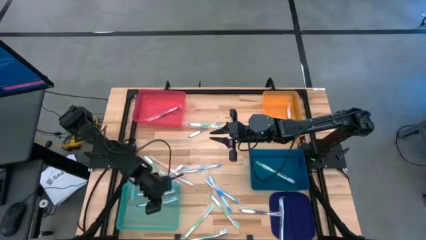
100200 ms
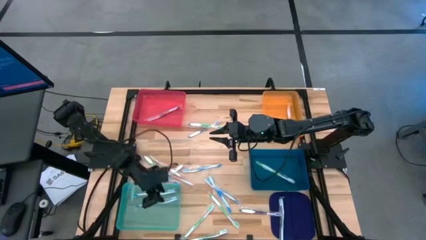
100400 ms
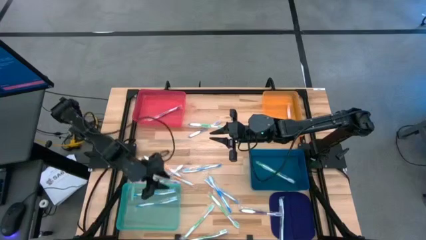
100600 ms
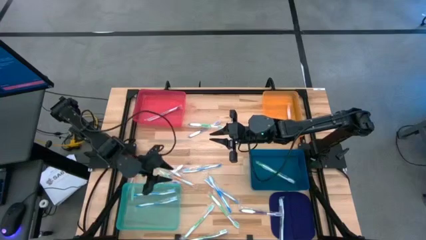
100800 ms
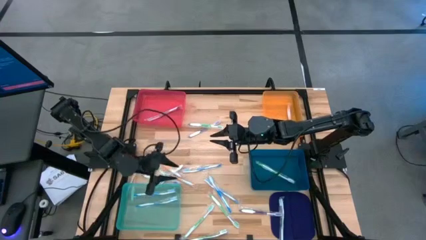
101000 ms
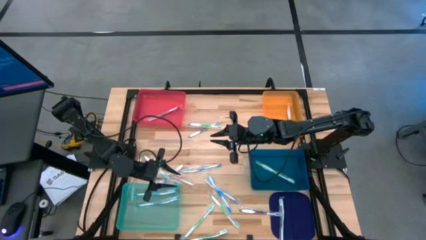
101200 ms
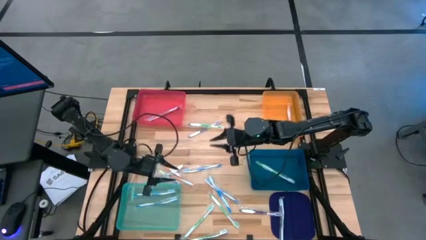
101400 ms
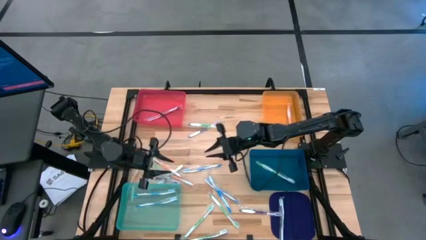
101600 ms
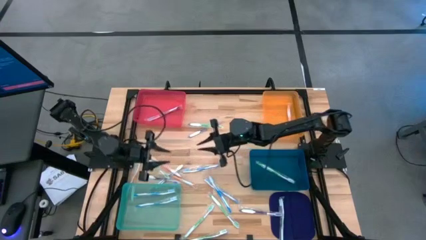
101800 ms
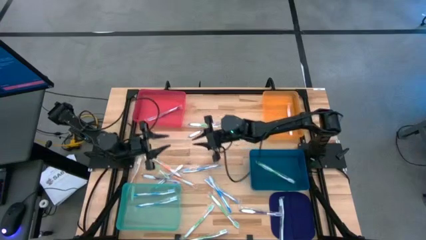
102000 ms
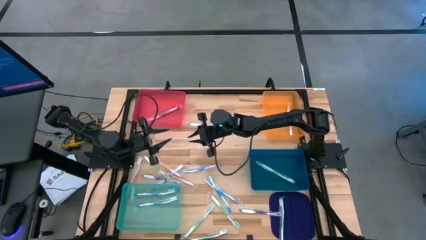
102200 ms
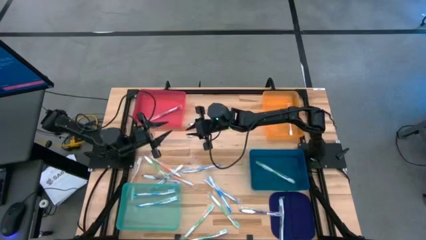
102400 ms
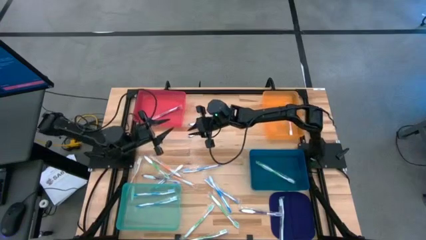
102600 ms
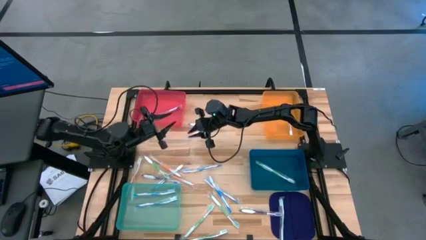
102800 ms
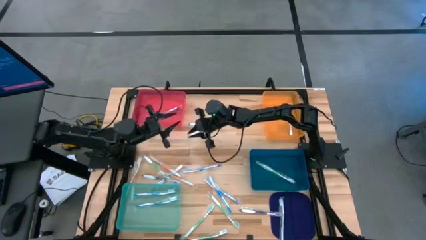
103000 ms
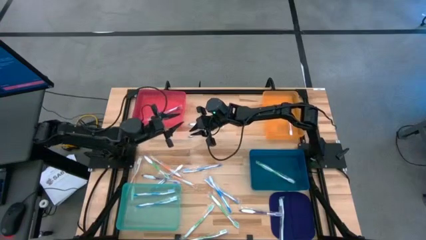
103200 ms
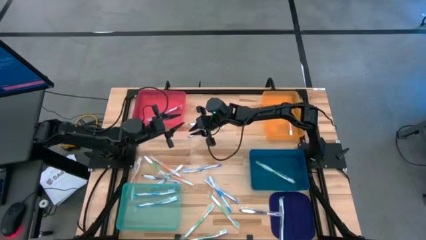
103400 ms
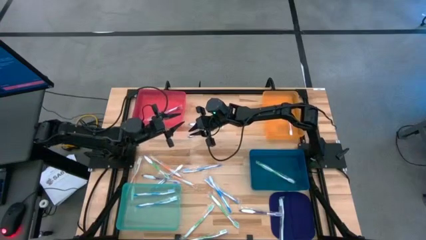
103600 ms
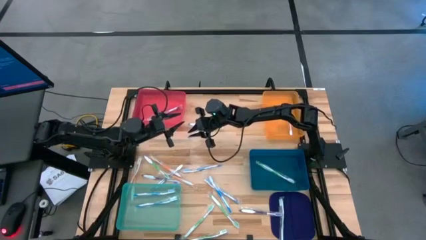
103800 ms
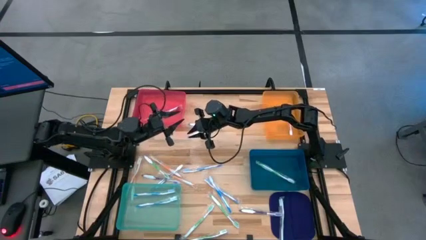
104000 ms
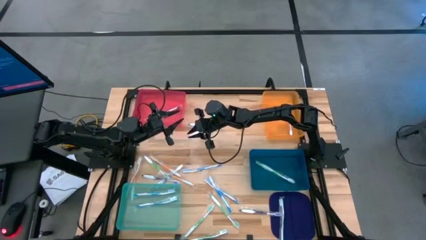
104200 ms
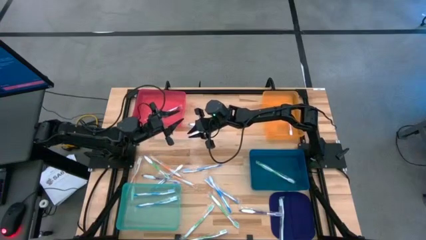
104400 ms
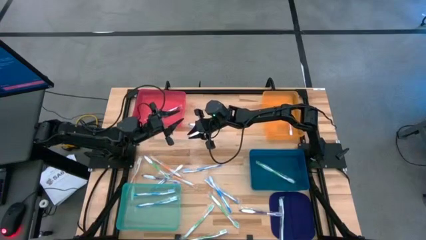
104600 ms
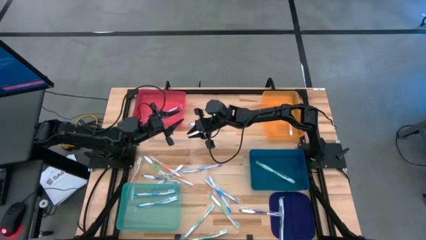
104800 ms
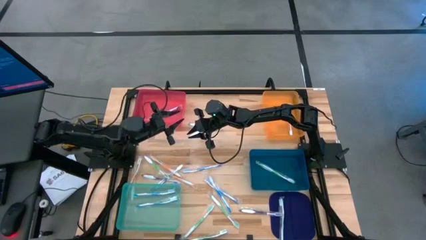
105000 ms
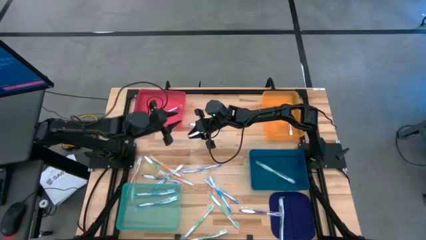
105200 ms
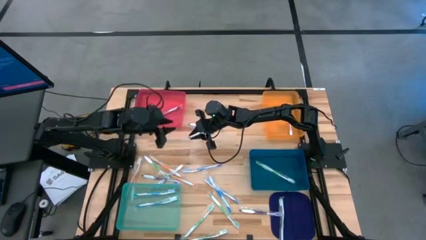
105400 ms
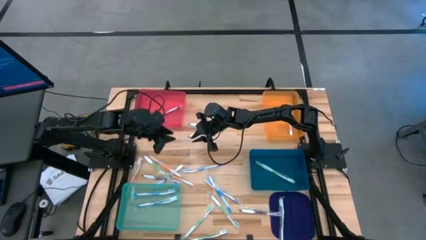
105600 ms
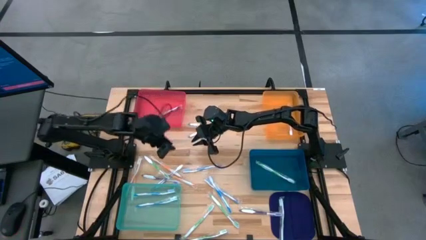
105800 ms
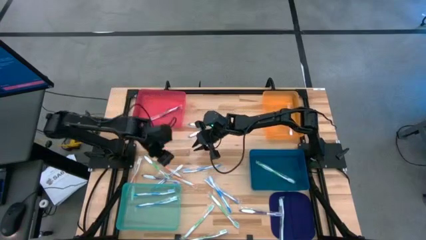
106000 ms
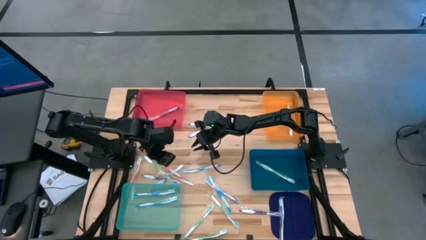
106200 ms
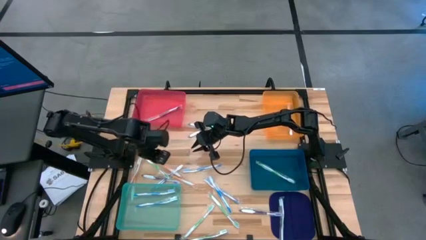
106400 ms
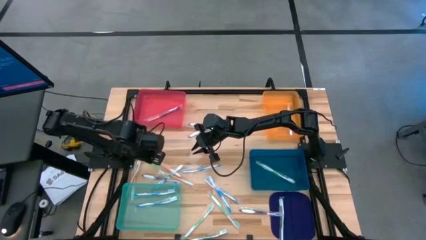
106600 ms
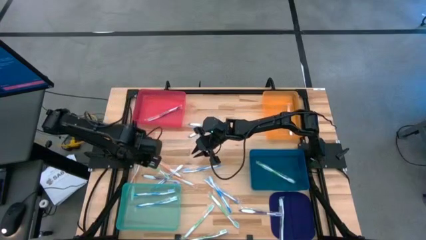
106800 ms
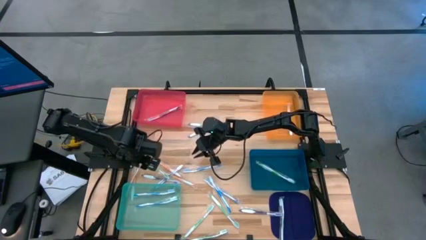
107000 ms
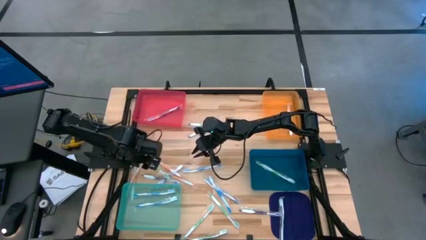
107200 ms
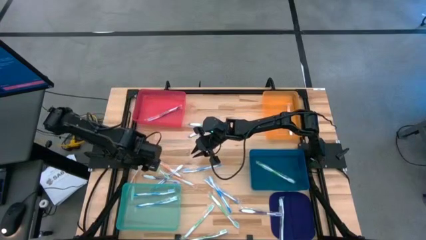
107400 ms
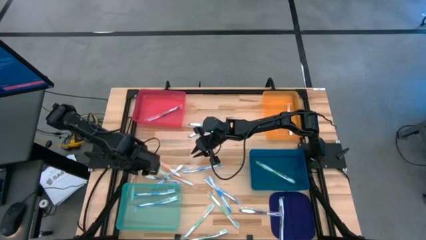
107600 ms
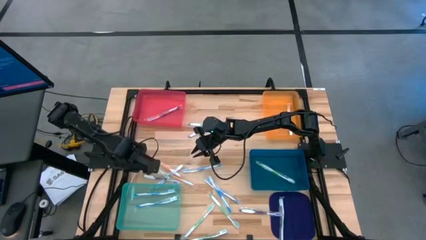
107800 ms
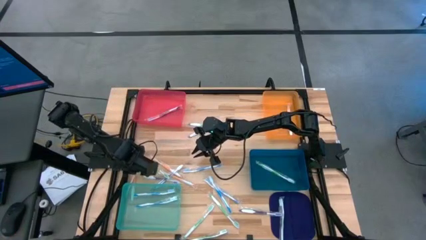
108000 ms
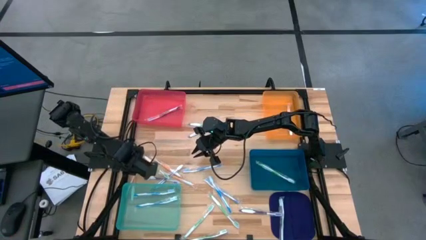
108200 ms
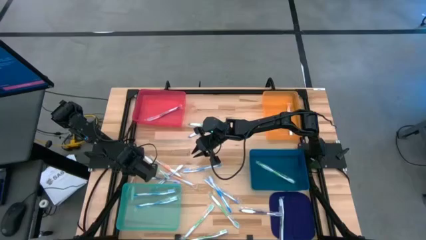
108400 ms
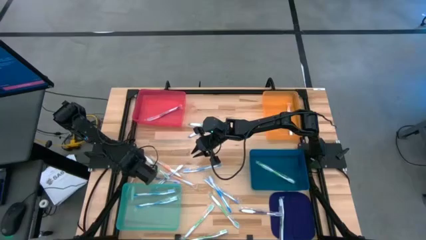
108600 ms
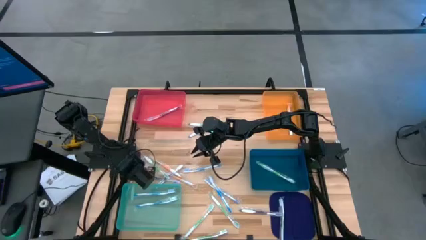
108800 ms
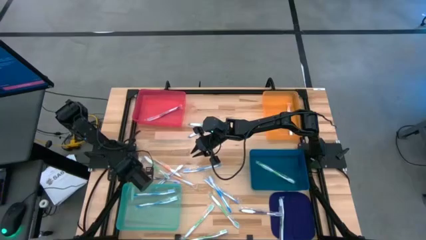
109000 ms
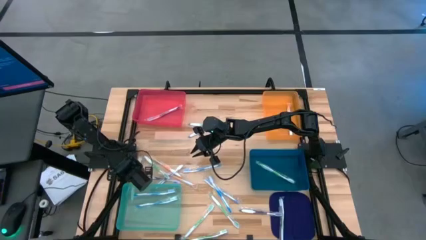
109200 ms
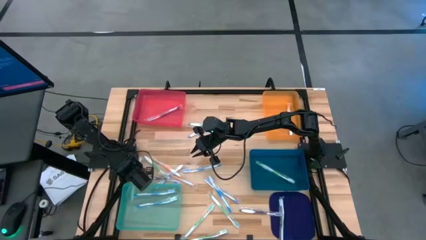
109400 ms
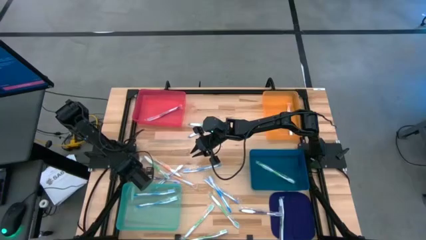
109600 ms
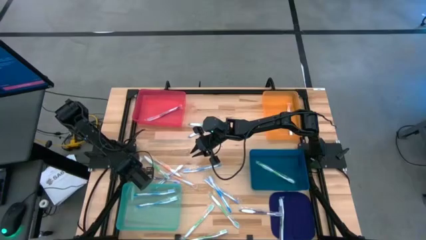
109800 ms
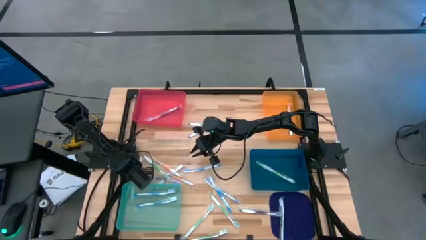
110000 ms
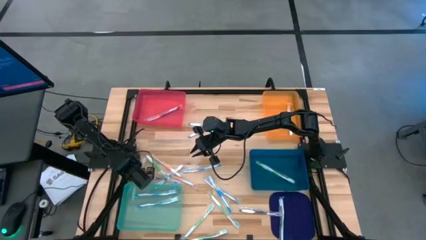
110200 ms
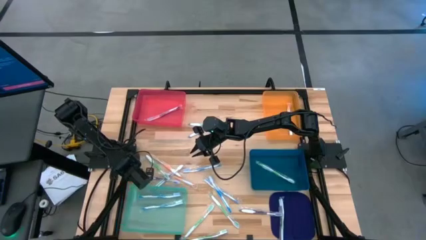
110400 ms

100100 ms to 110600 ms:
Task: Pick & Place Toothbrushes
Put the orange toothbrush into the orange bin

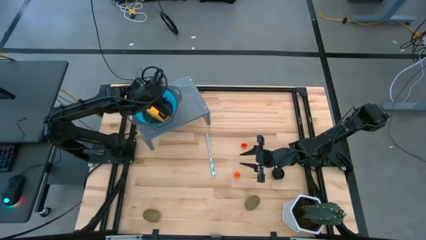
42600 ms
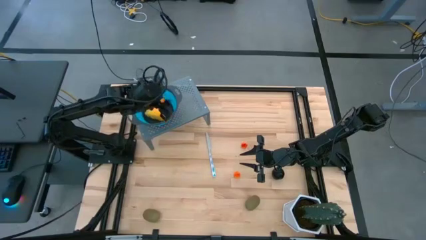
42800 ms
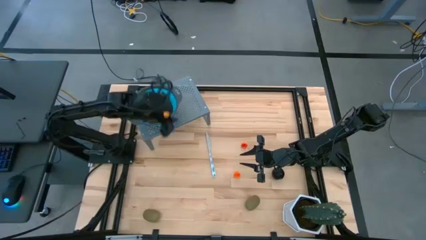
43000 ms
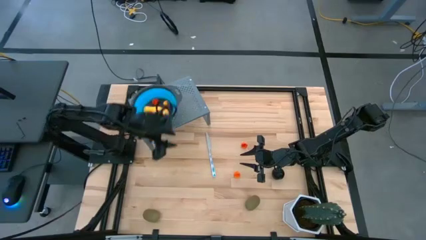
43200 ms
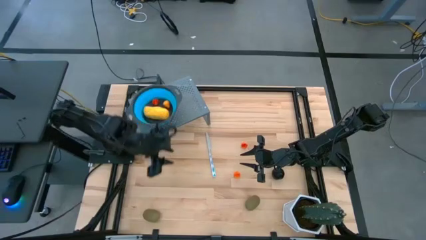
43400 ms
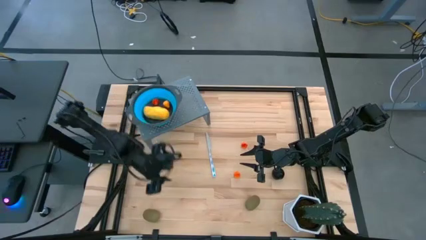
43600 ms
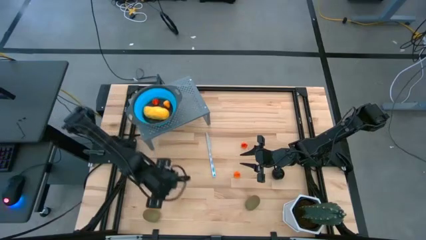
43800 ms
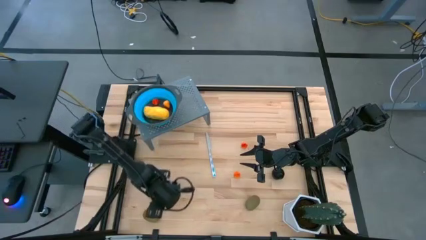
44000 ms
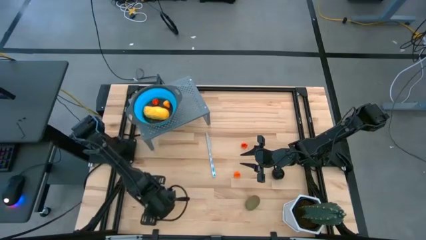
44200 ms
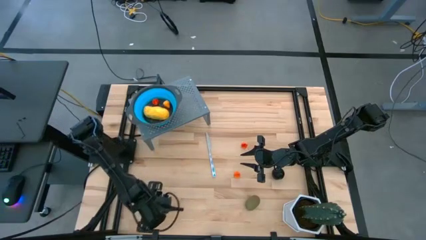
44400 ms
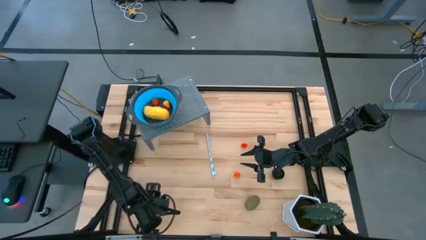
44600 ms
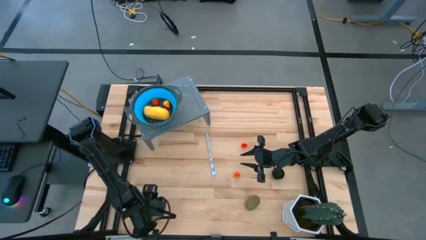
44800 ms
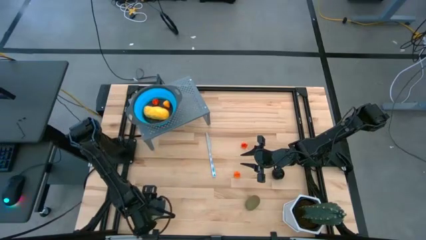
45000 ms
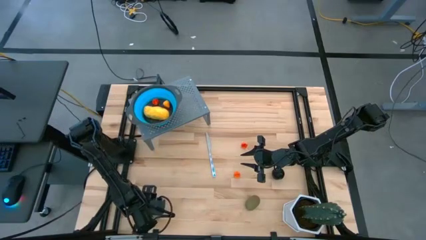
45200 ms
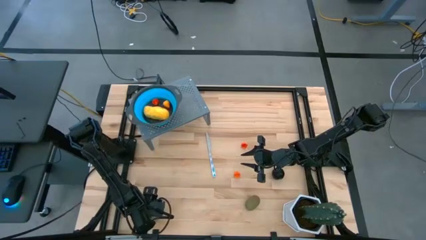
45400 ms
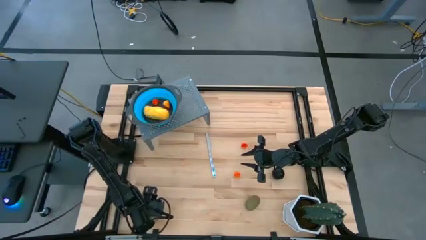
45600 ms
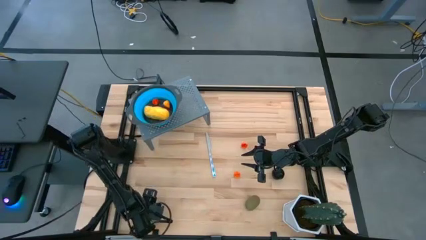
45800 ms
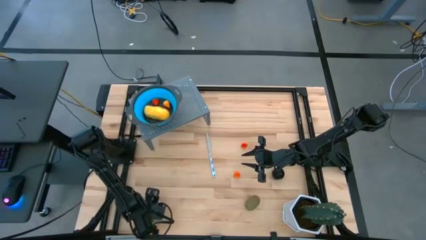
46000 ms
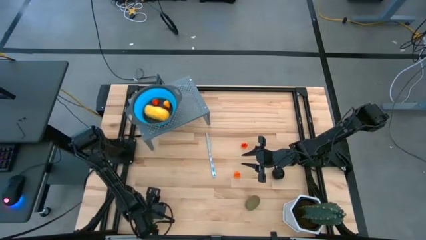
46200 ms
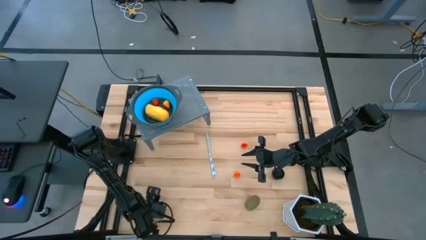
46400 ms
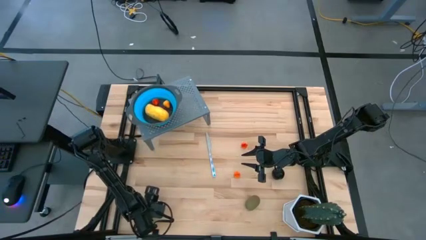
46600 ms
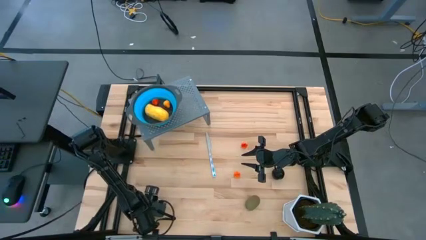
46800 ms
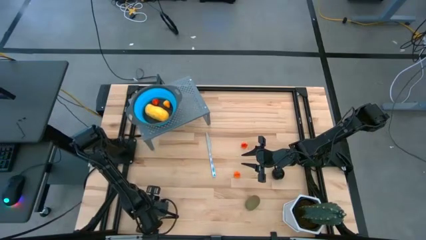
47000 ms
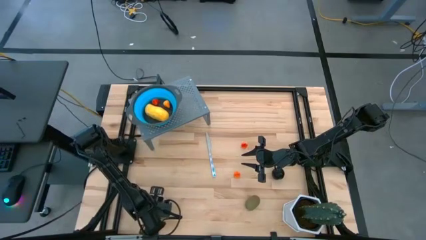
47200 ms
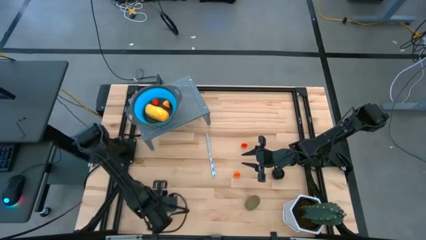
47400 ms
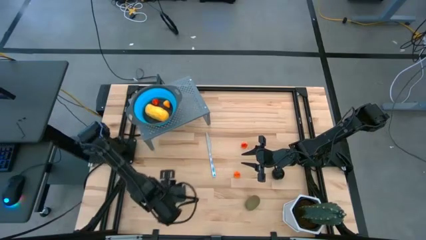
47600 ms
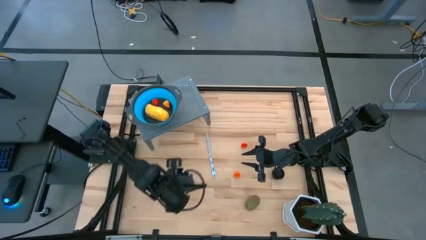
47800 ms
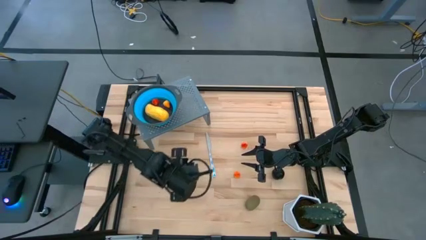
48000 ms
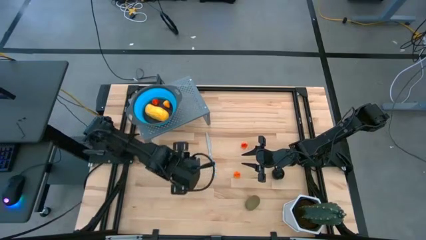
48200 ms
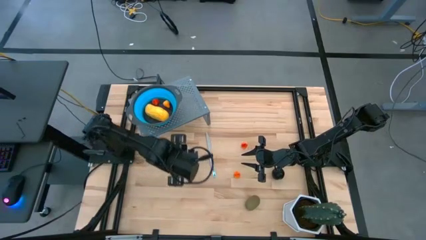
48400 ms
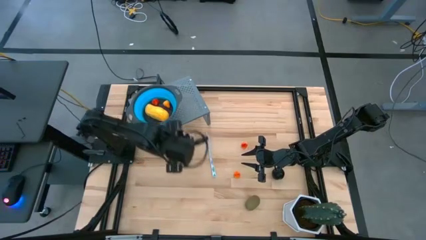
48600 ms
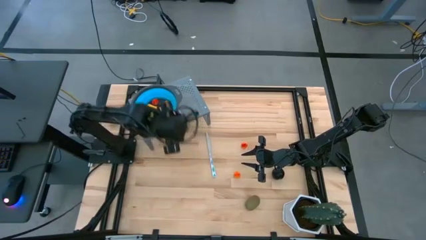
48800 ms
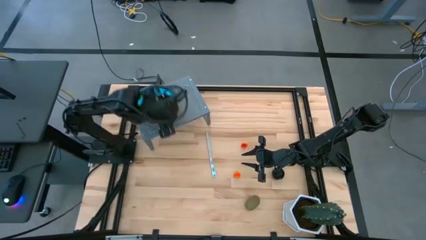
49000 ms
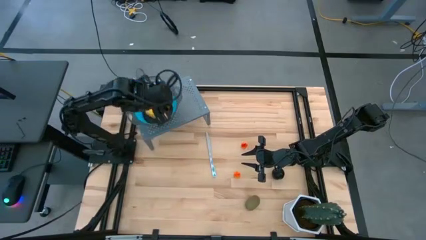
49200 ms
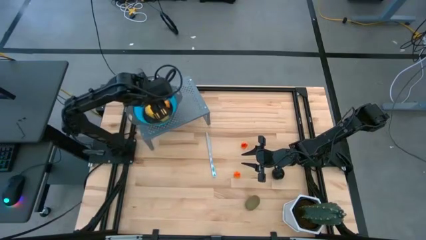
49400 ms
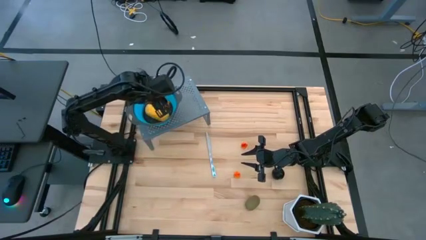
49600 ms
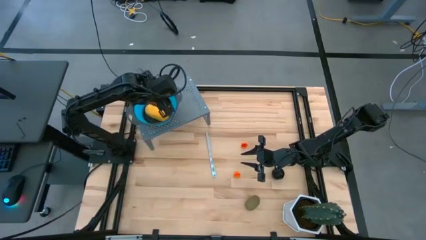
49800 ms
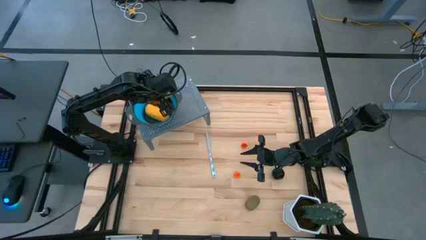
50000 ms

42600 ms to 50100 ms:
Task: Pick & Place Fruit
Put the brown kiwi into the blue strainer bowl on the shelf
